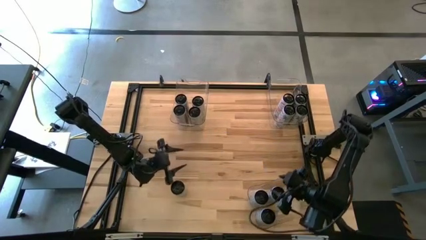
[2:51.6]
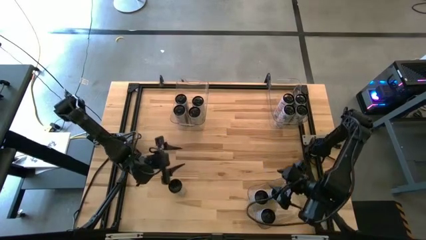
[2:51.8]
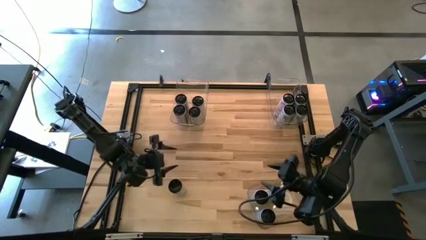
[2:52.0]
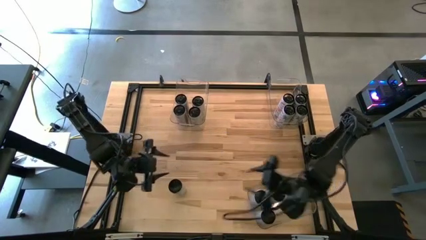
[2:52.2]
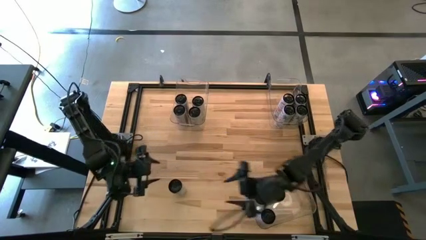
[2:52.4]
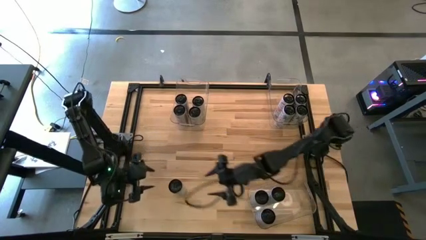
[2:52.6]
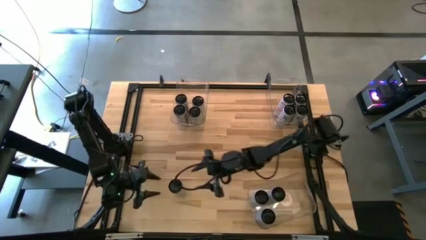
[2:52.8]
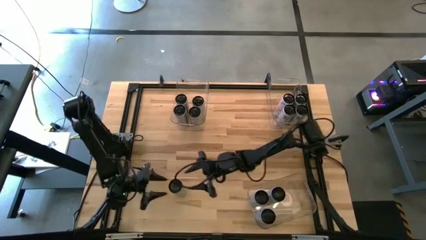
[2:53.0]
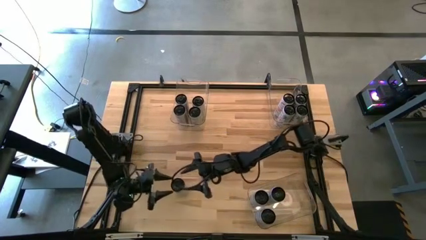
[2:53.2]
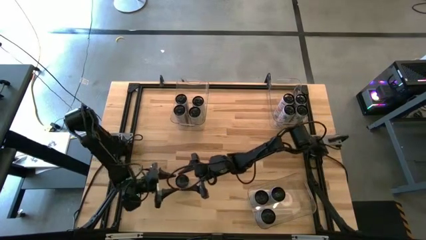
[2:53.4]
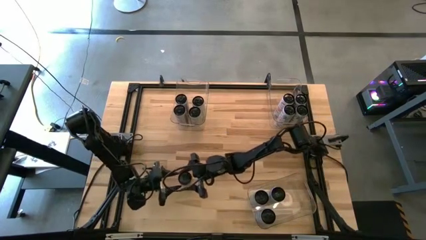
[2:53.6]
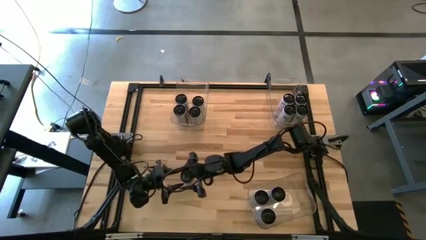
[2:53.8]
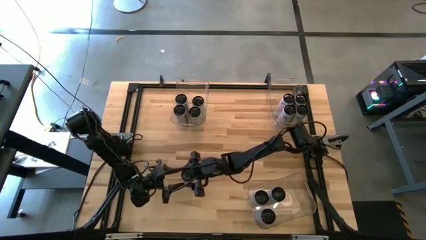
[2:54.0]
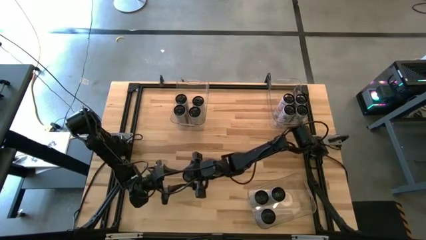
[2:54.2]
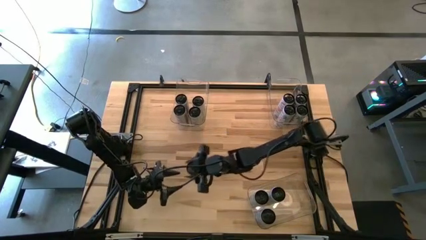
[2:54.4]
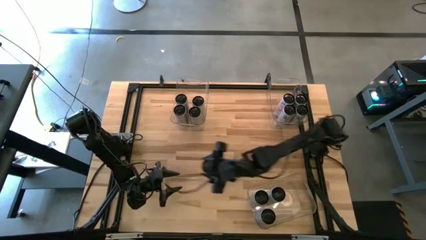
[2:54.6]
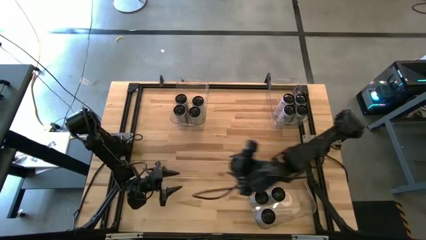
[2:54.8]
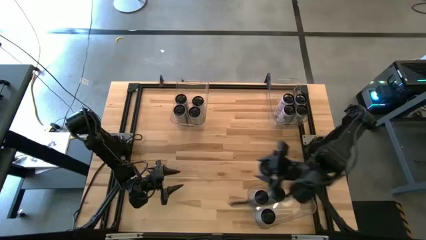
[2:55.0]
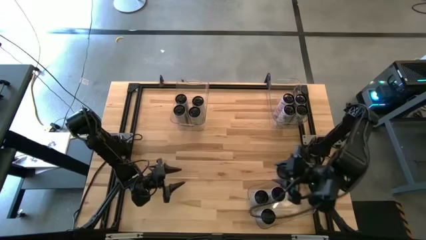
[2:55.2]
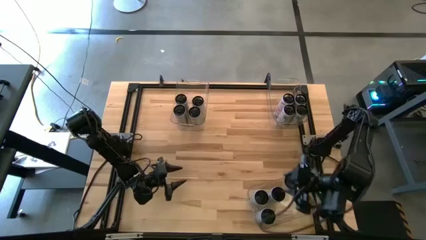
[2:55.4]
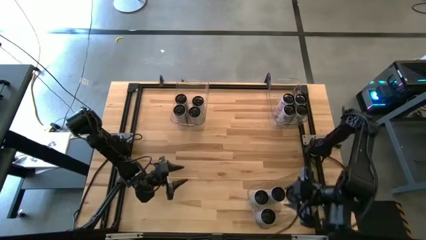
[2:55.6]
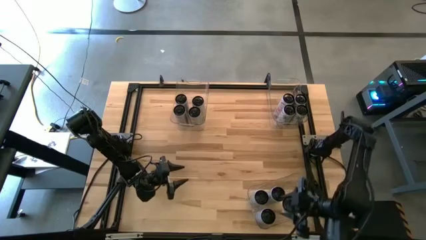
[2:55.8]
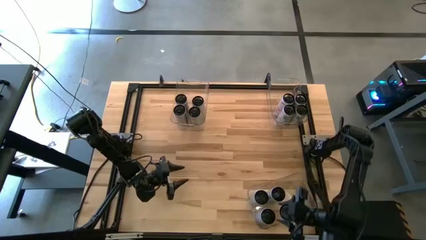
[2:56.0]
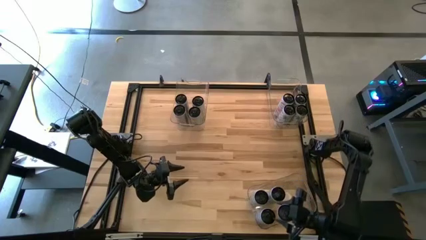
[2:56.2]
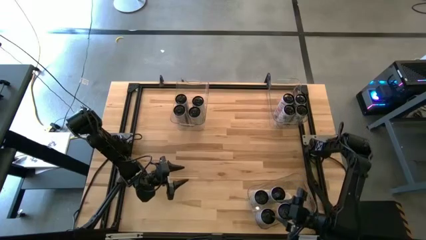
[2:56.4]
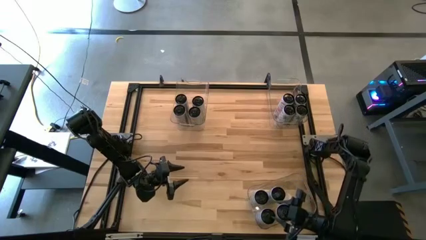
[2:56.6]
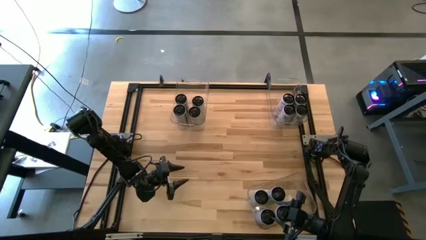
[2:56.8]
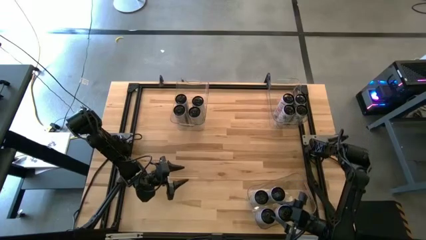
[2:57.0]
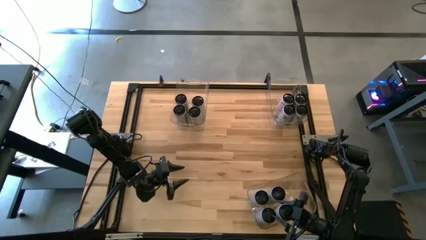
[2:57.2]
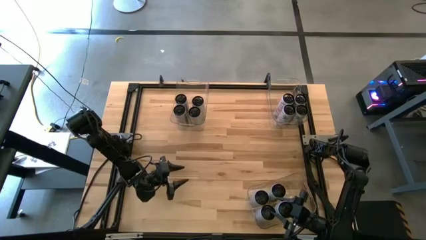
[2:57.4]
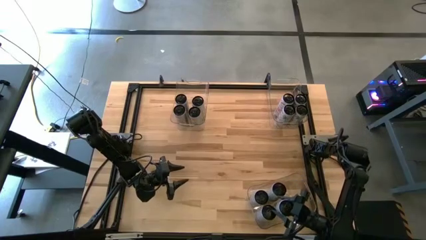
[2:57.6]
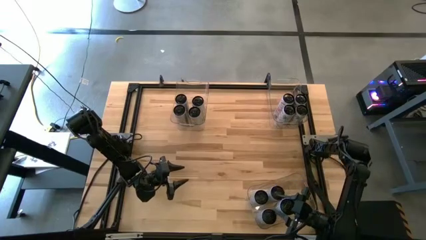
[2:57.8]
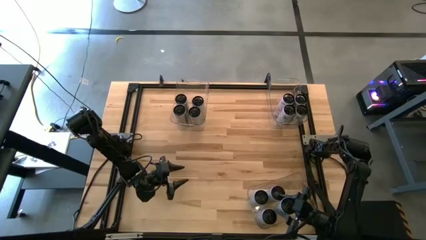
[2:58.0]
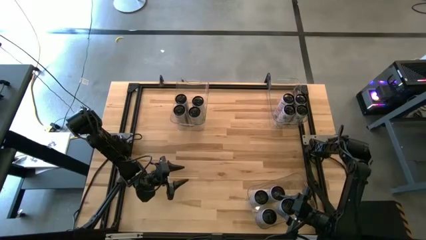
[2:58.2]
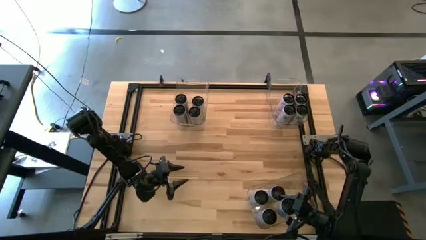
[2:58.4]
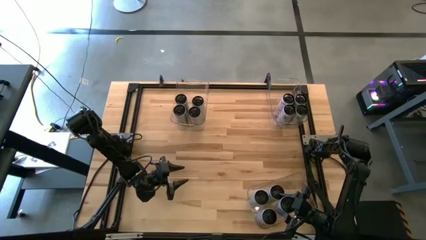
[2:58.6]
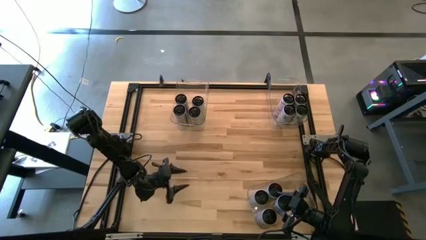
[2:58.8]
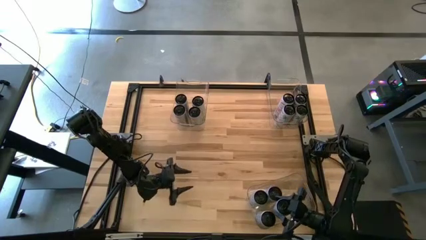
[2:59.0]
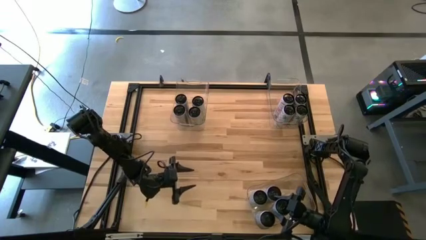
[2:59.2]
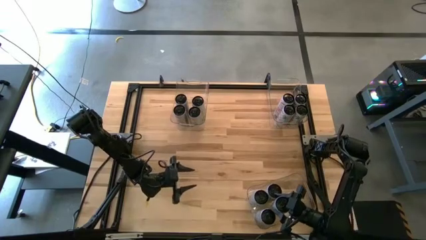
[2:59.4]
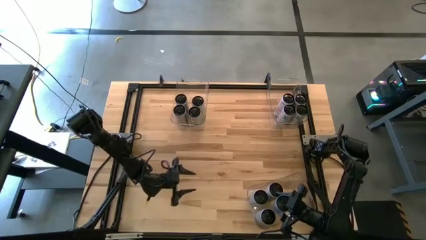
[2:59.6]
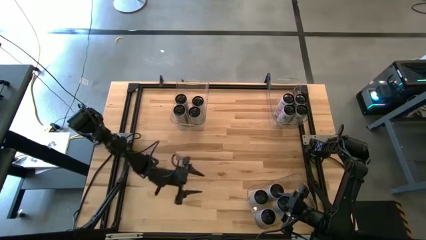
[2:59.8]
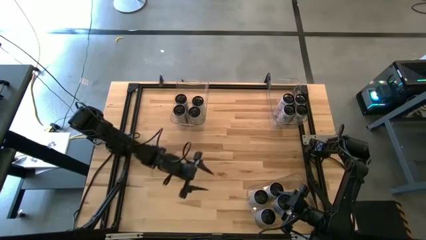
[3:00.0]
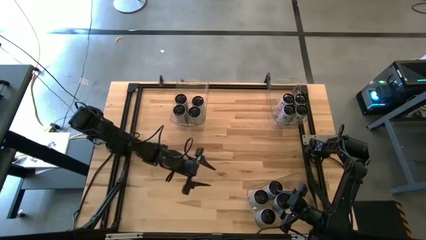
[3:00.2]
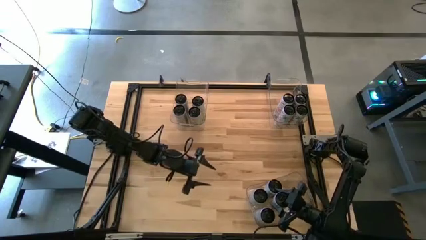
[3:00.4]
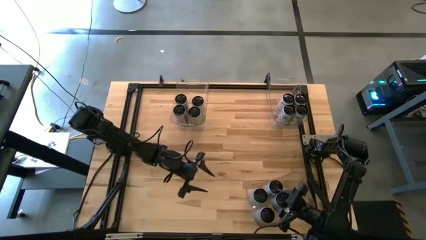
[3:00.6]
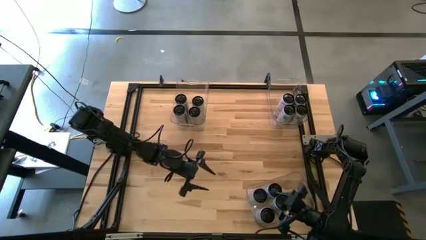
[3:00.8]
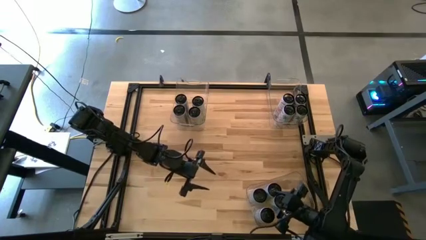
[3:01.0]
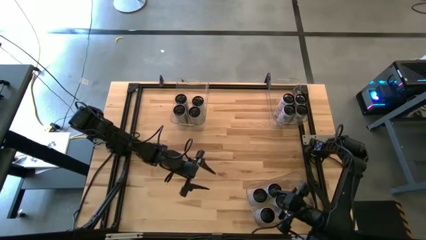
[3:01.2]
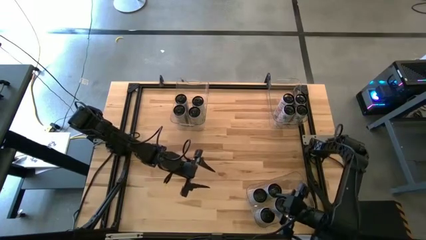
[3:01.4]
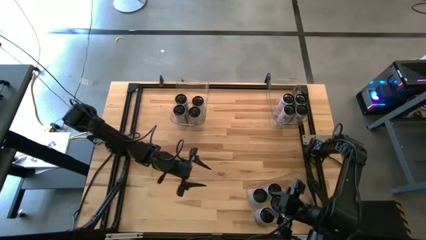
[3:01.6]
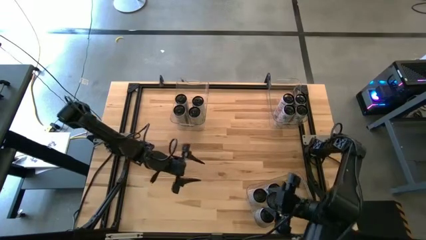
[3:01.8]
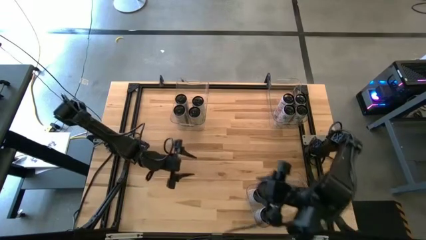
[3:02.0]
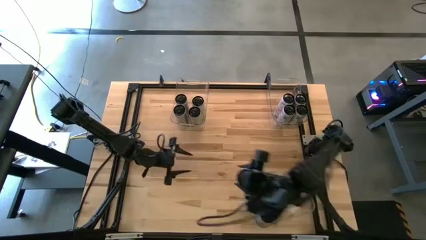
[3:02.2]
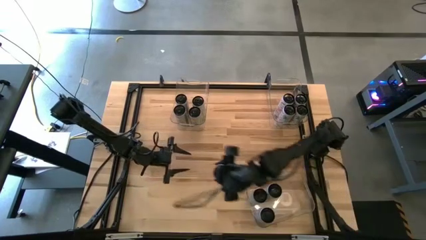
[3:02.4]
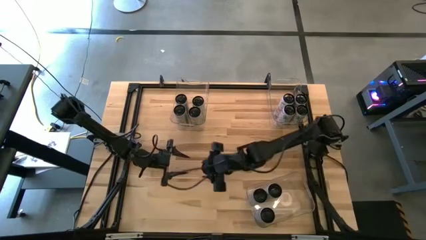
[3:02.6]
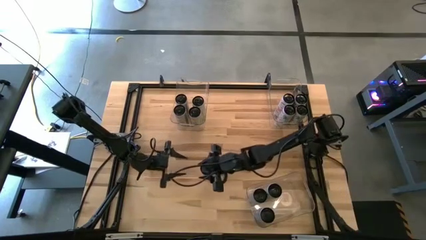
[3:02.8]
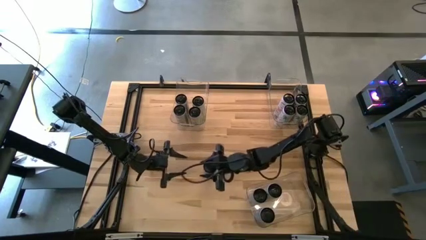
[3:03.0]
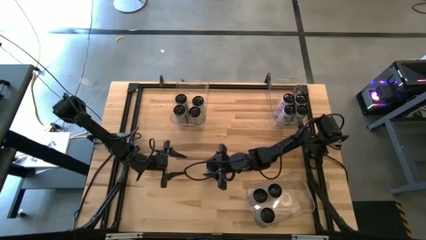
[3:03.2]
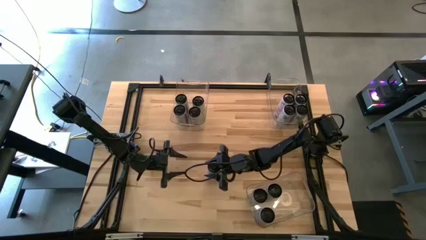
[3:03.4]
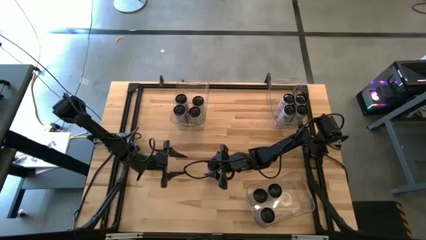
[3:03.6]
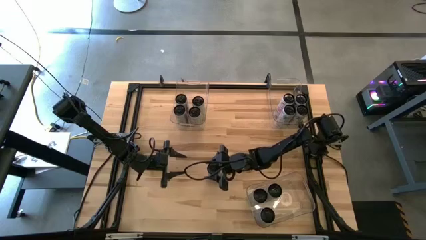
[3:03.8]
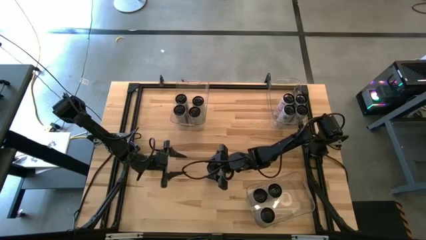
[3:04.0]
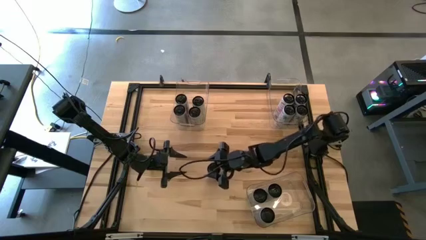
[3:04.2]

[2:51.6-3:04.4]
Task: Sort soda cans
Put the white/blue soda can into the bottom right transparent bin

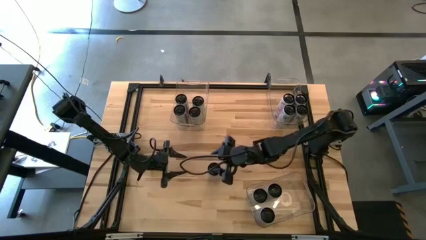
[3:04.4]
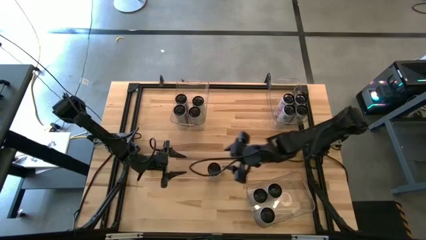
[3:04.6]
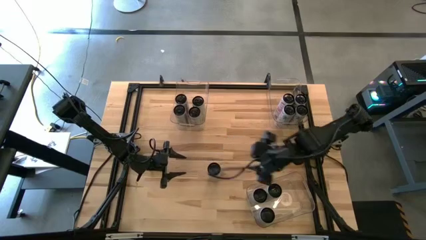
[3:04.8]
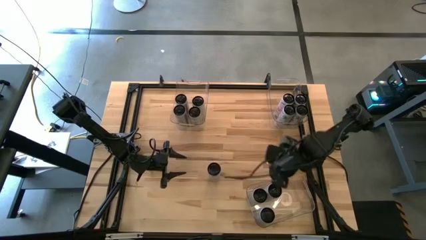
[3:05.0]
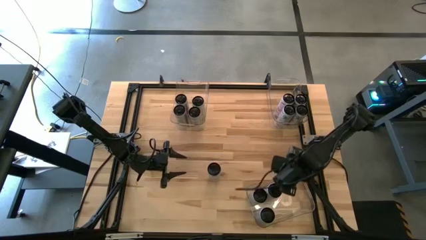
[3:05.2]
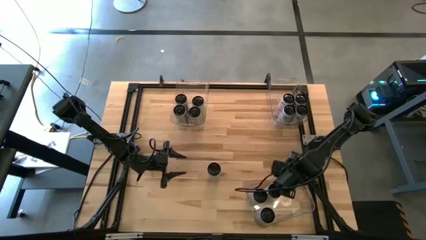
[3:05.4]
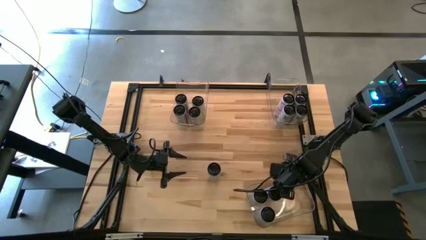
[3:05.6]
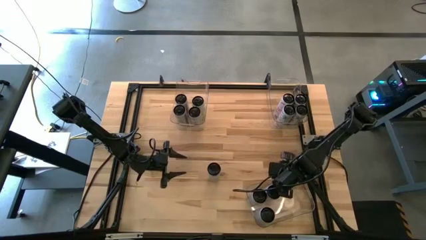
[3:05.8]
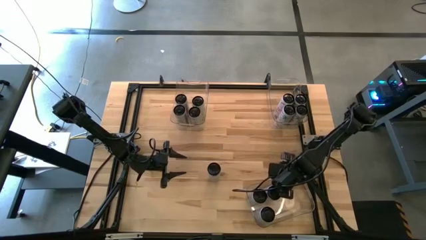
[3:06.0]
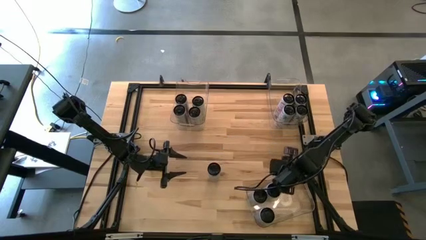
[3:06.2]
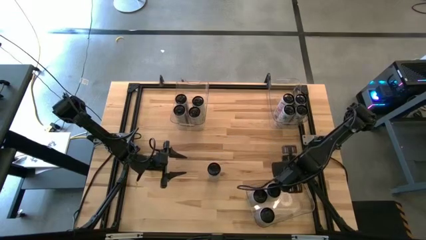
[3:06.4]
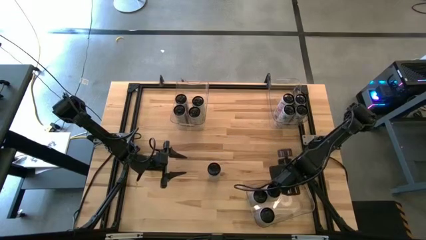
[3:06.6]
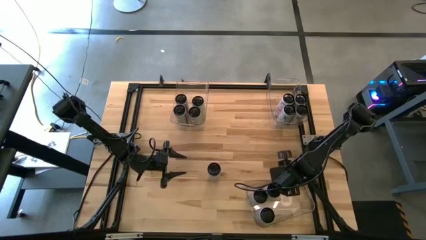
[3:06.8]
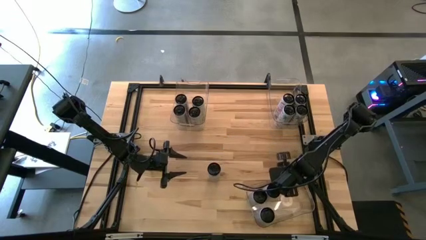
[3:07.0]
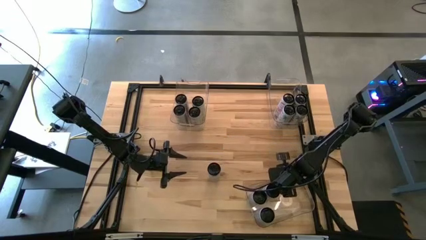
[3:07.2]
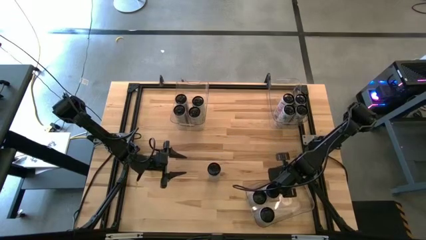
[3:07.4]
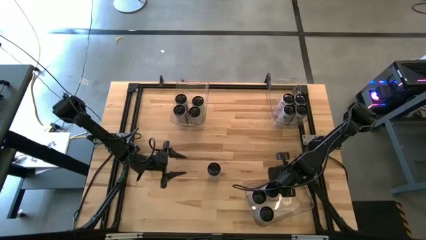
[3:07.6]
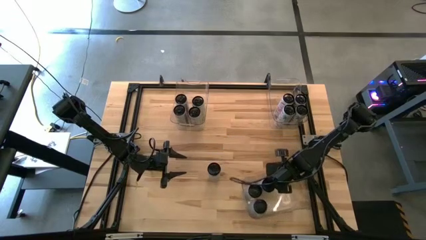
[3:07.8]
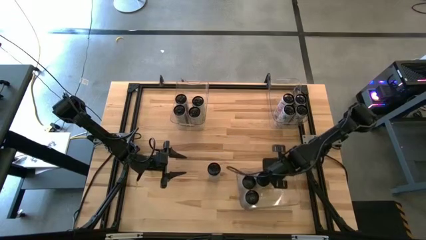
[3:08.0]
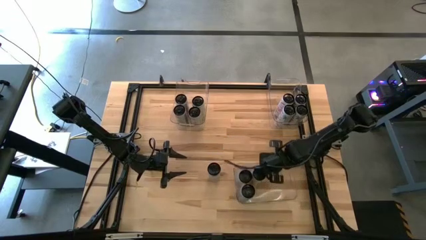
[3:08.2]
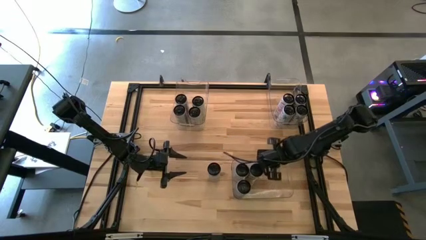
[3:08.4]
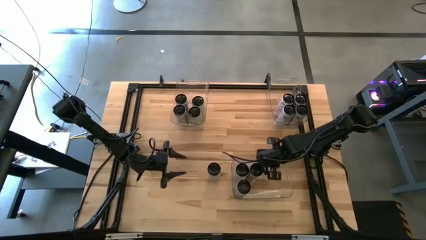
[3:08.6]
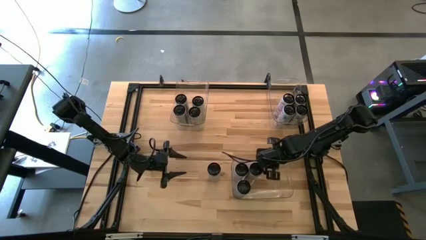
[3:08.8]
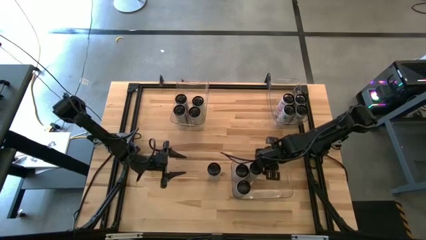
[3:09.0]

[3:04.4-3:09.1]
Adjust the bottom right transparent bin
